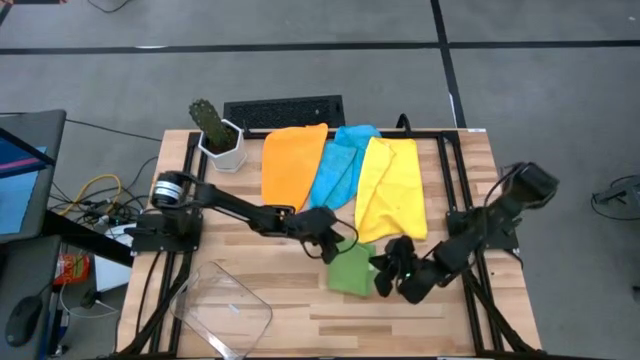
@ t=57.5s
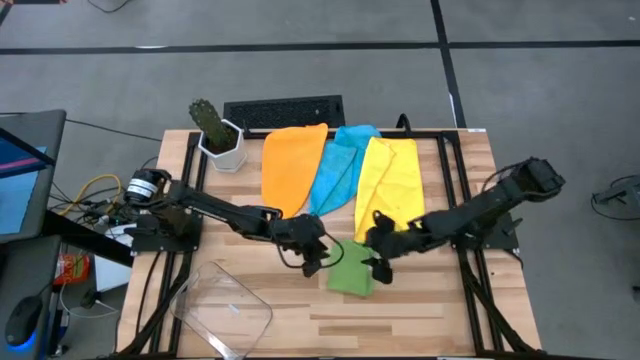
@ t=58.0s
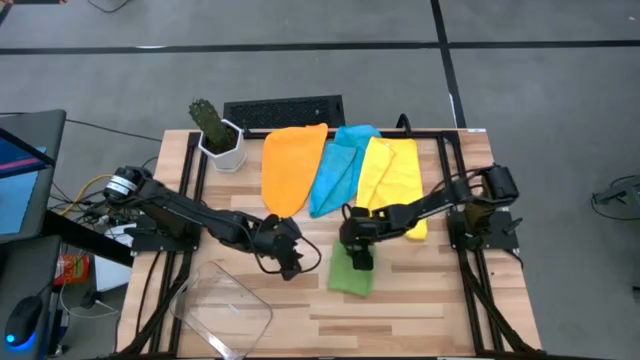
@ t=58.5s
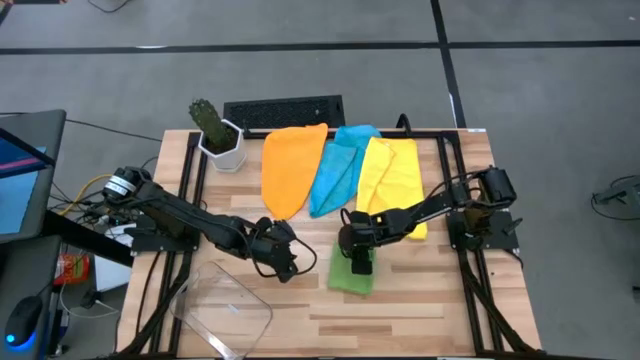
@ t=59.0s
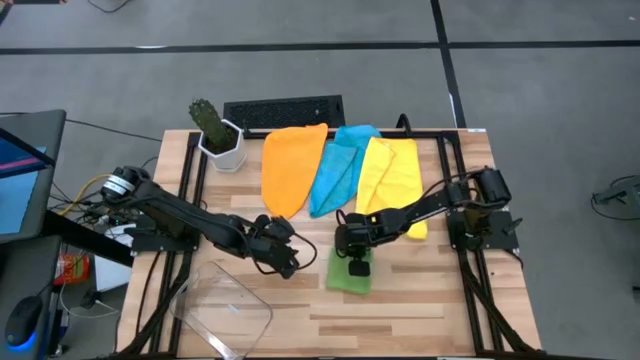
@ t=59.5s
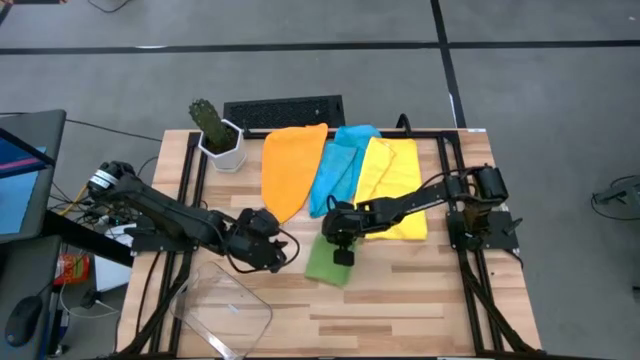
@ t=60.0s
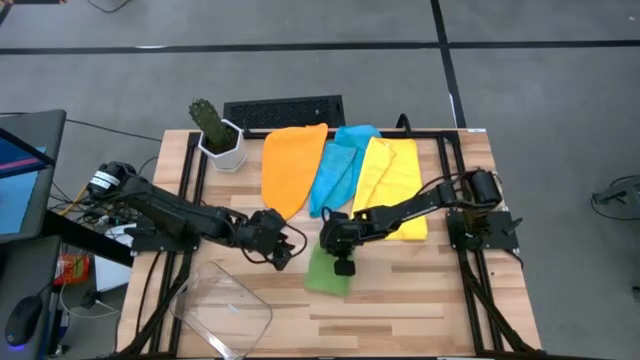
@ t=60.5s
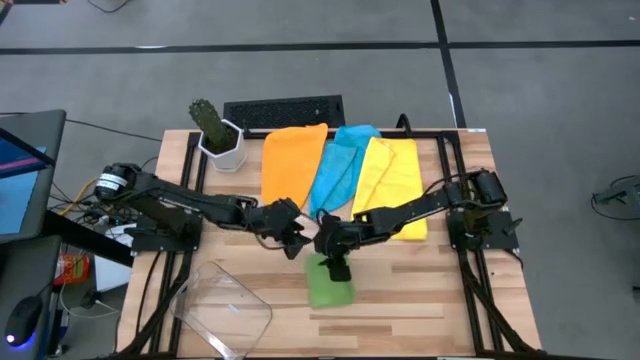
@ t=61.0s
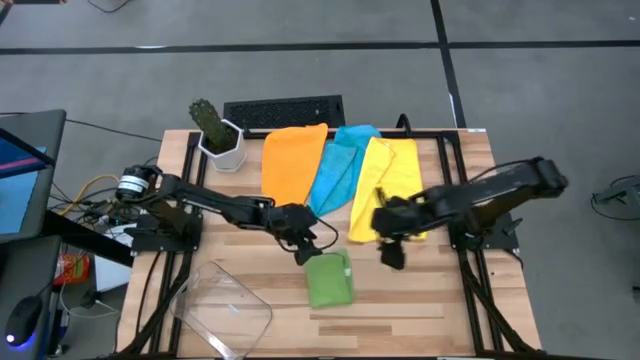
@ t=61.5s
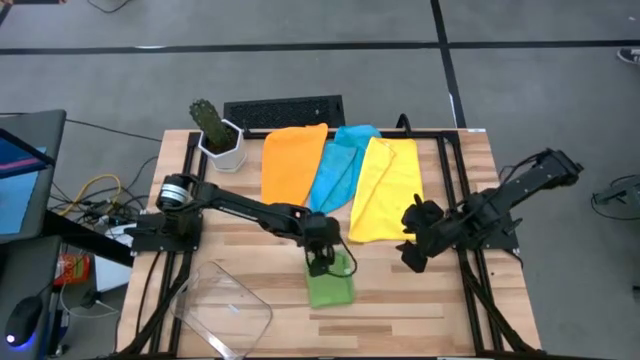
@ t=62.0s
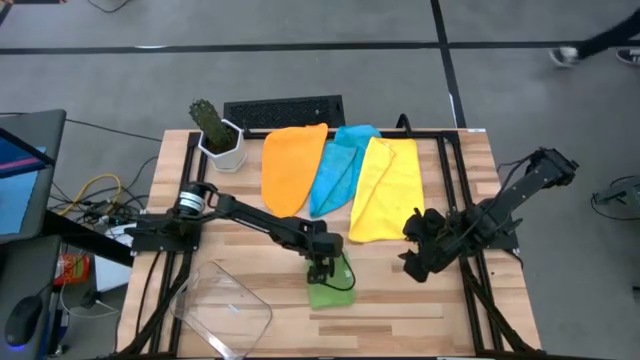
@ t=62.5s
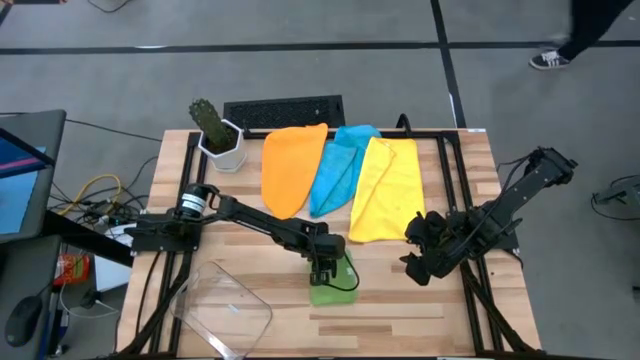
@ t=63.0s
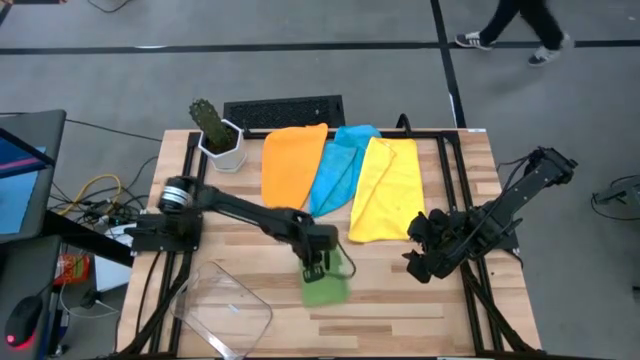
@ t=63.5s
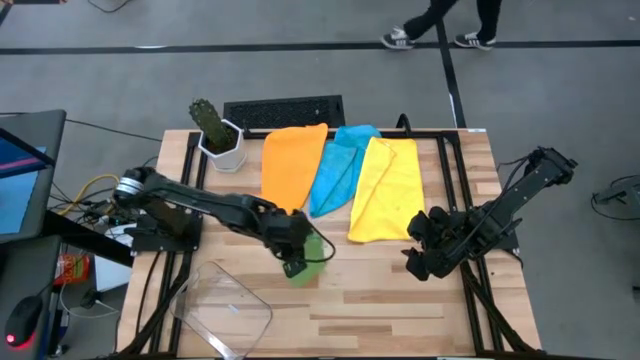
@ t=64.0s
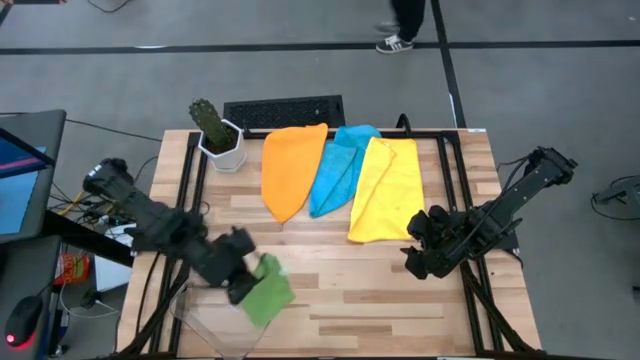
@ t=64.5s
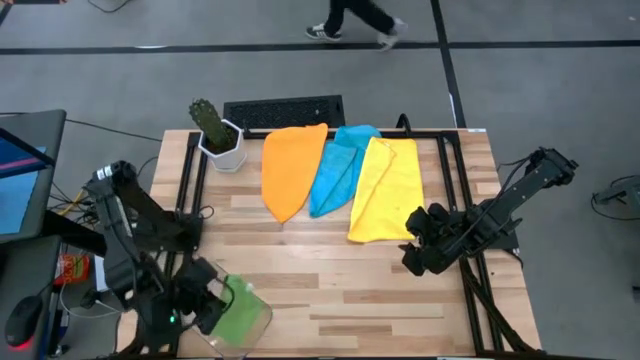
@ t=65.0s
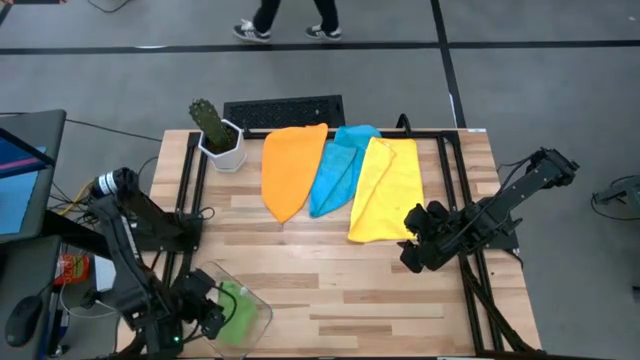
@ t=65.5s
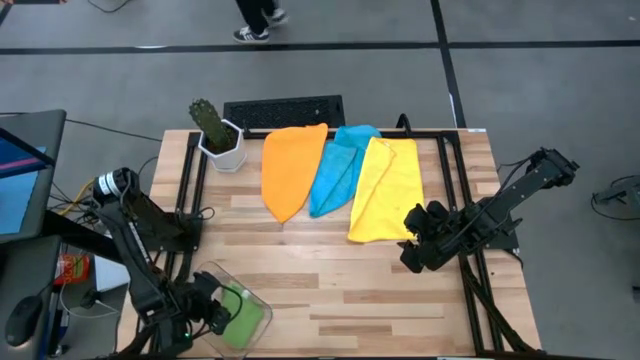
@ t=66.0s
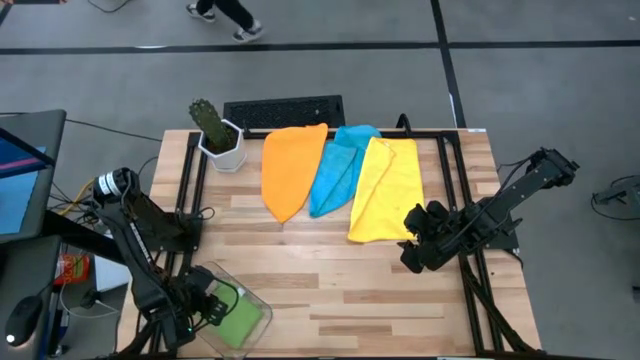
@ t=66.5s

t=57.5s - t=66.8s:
Task: Fold microfiber towels
Put the green microfiber towel into the transparent bin

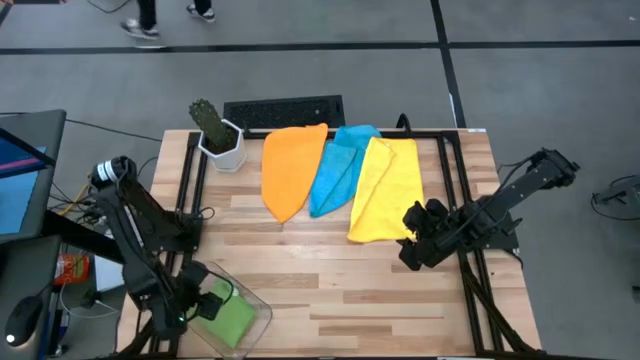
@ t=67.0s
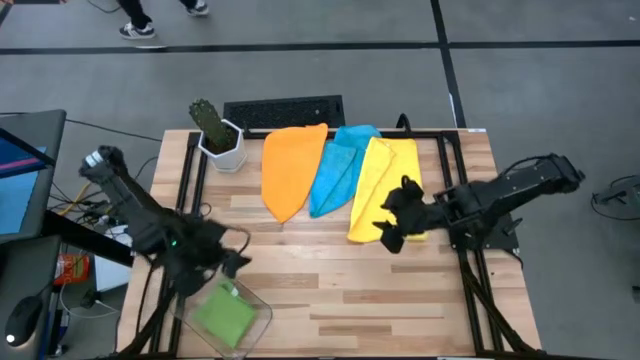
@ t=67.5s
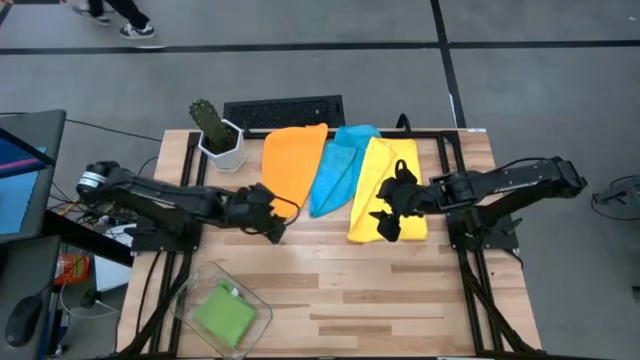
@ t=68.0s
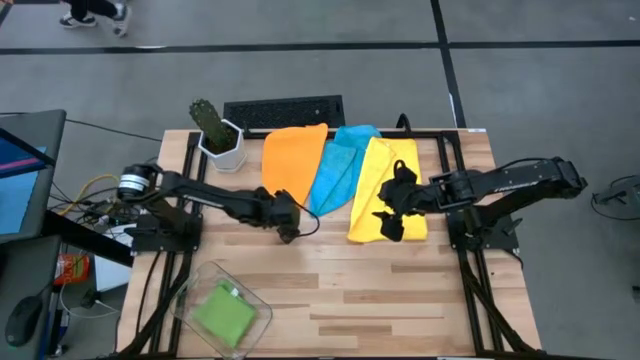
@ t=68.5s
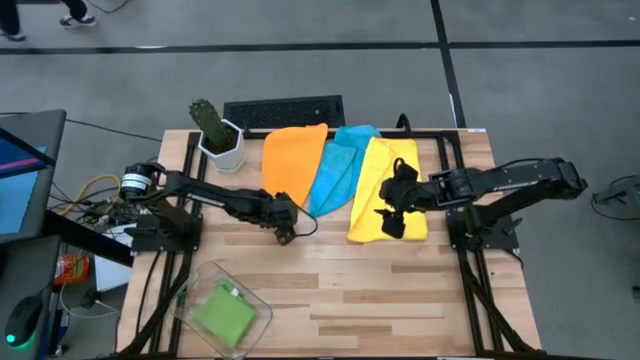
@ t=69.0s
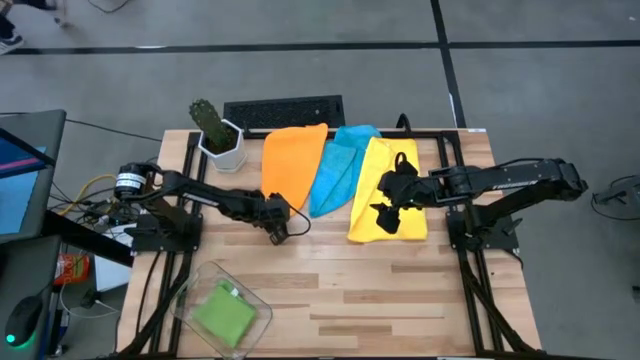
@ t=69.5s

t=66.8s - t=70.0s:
Fold the orange microfiber towel

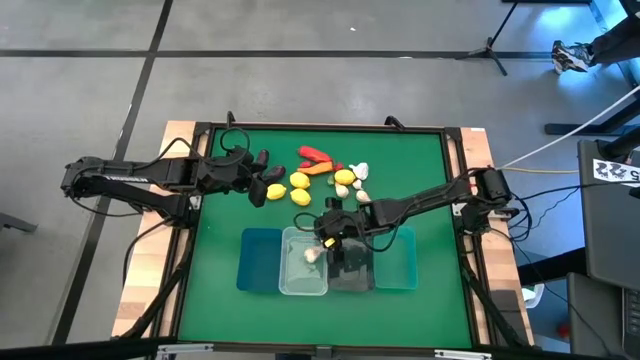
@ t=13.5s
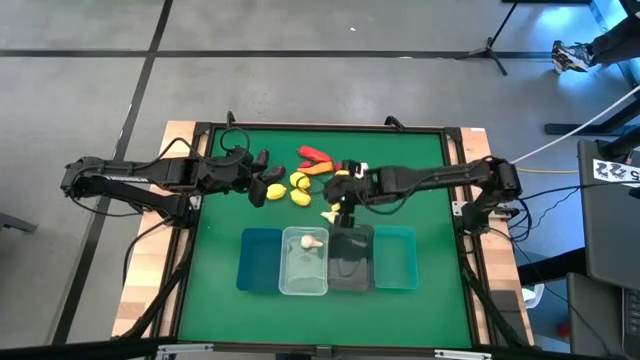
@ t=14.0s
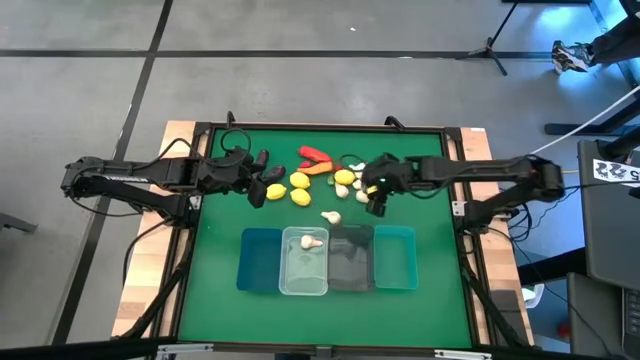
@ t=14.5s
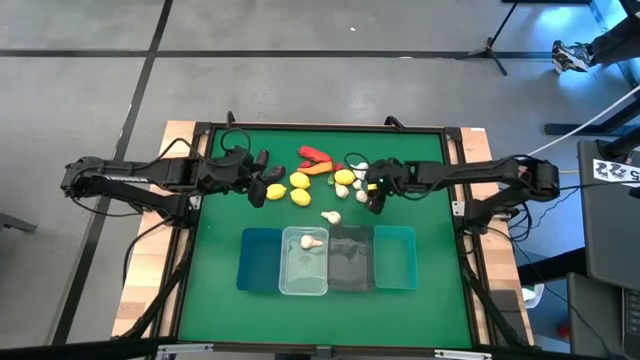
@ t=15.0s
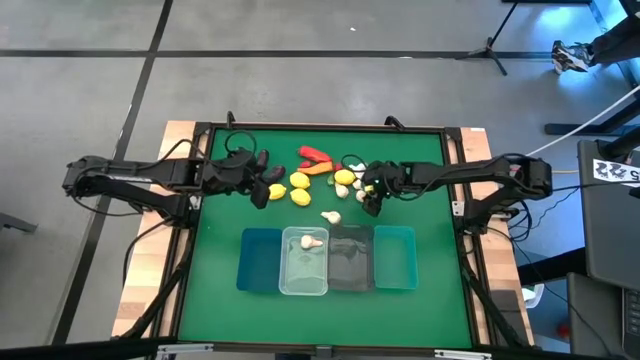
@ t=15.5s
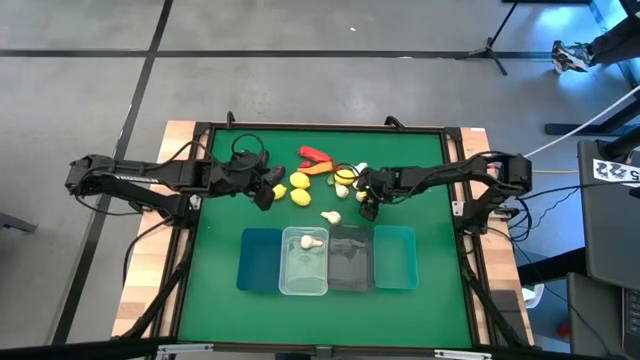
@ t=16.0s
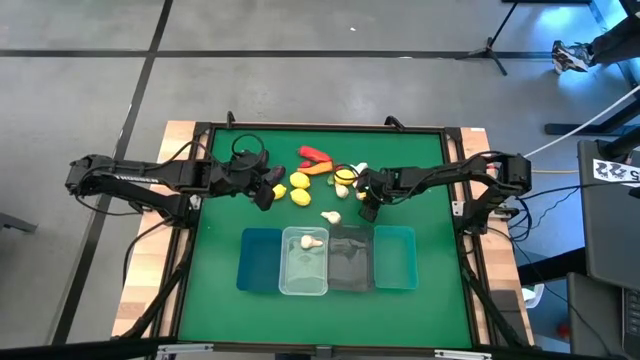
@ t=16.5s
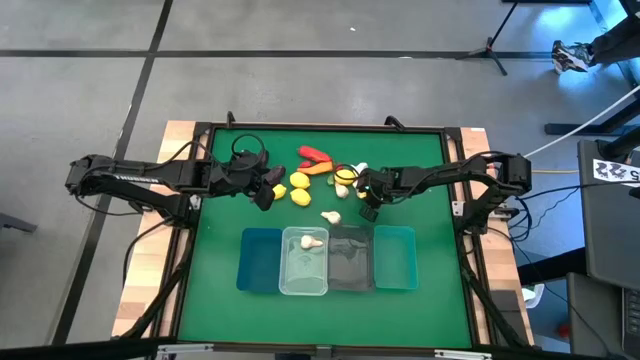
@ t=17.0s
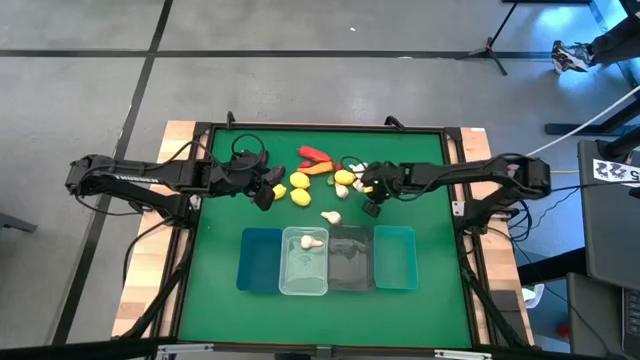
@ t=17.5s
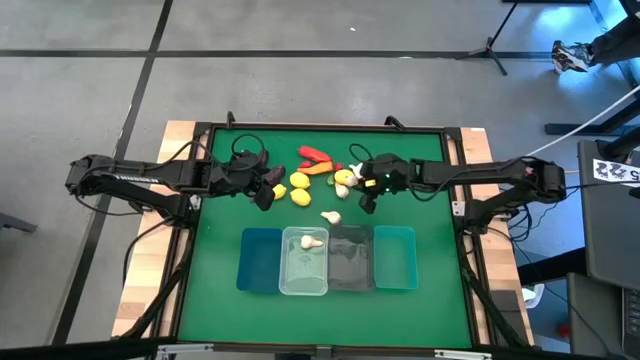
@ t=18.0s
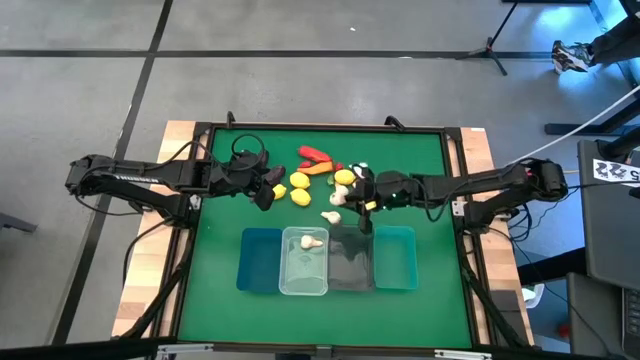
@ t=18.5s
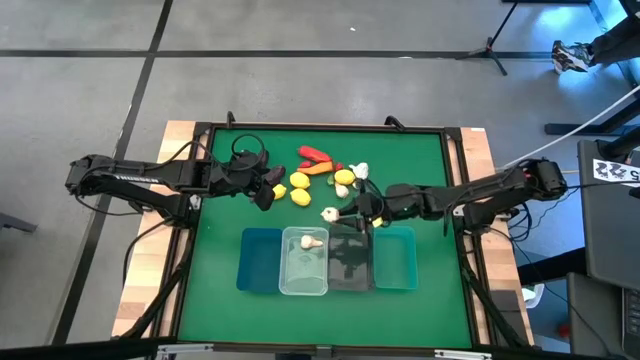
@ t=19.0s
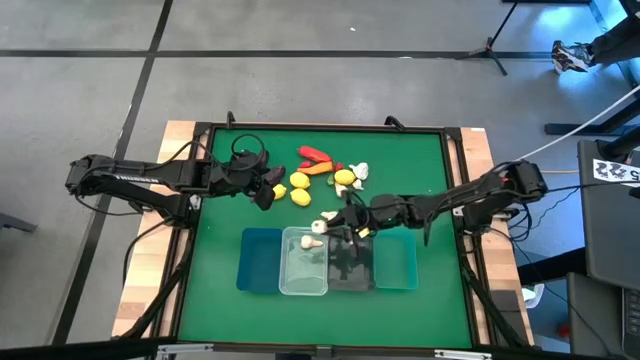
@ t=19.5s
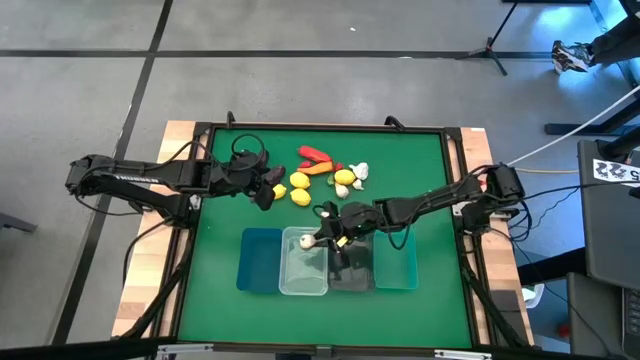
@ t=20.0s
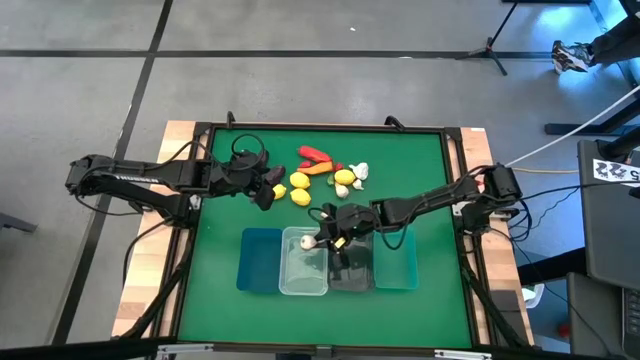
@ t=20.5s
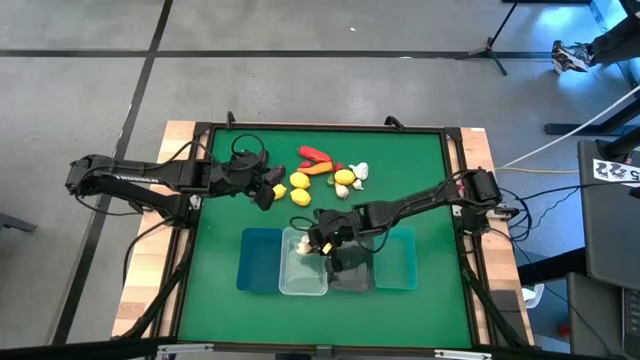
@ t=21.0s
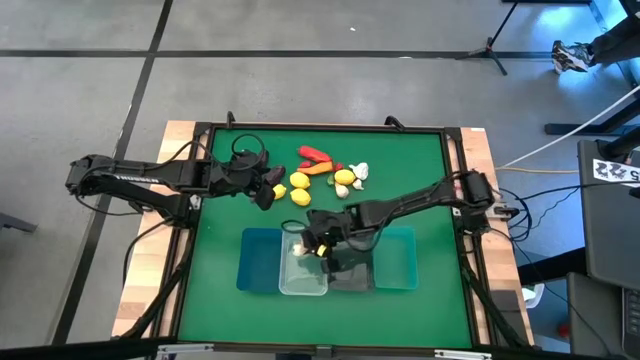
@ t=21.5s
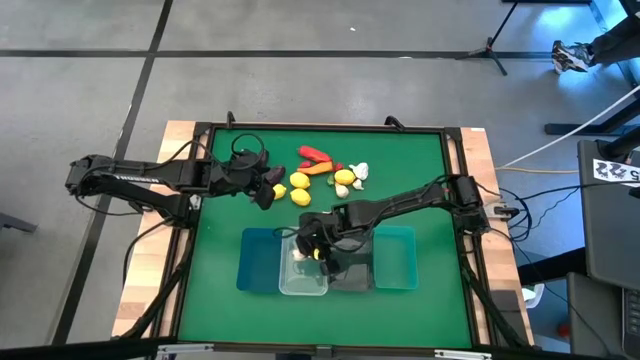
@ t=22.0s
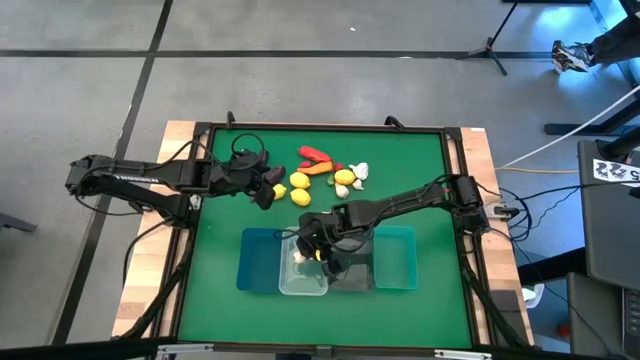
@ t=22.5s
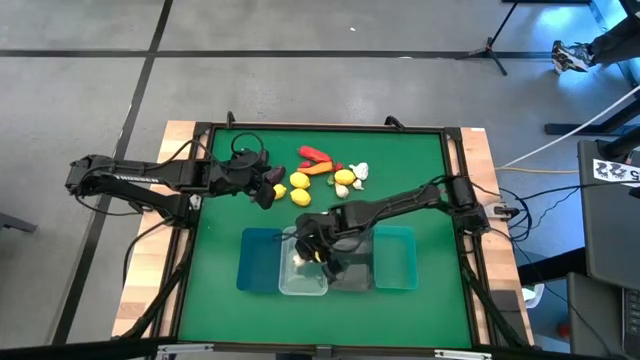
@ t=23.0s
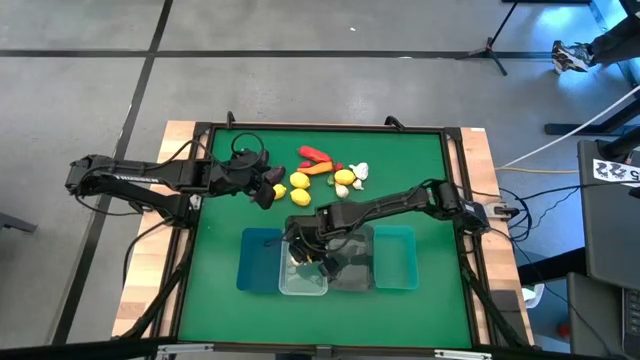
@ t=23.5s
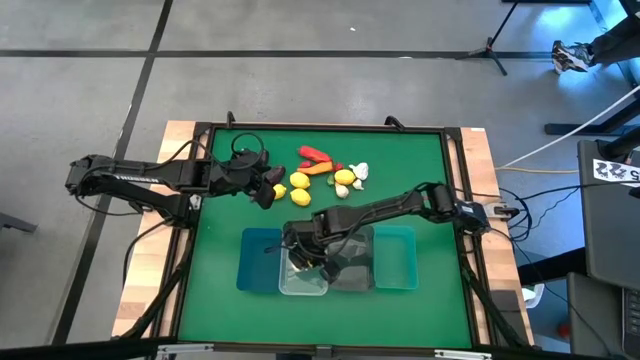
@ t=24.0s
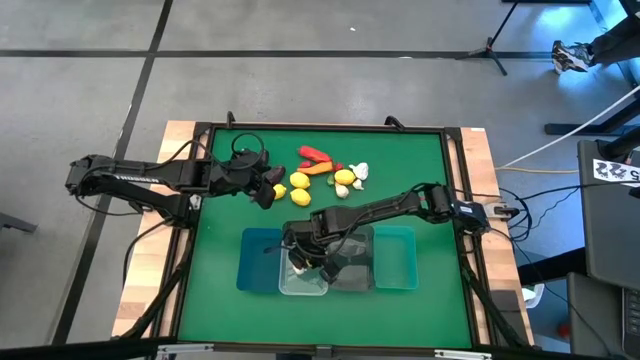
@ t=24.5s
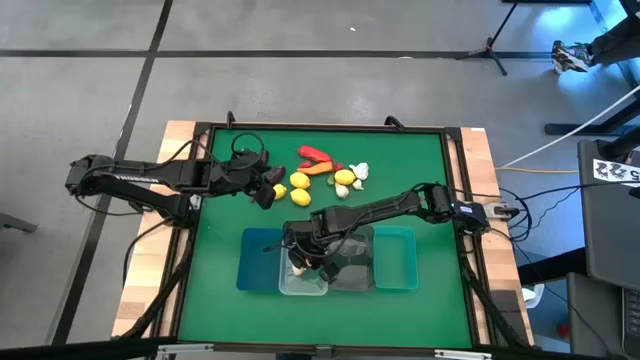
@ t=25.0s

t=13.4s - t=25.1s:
Task: Sort produce into baskets
Put the white garlic into the transparent bin
